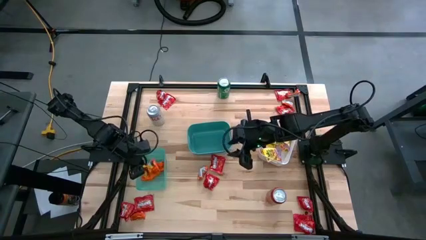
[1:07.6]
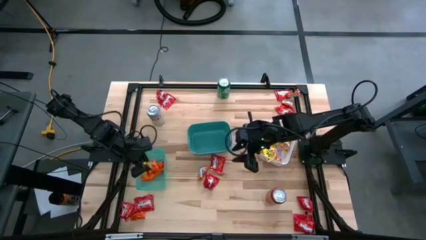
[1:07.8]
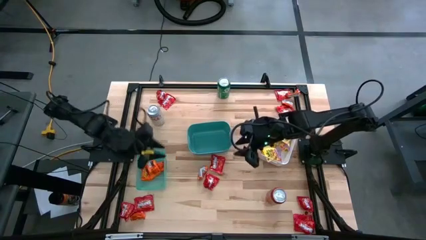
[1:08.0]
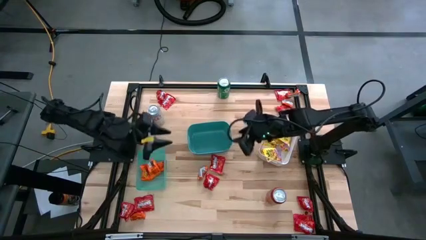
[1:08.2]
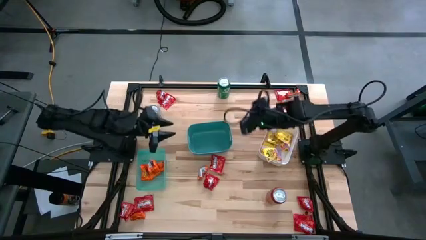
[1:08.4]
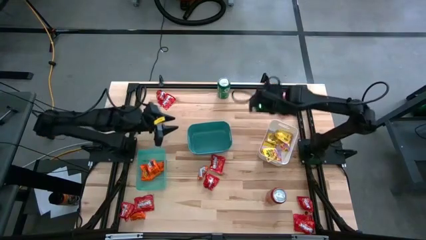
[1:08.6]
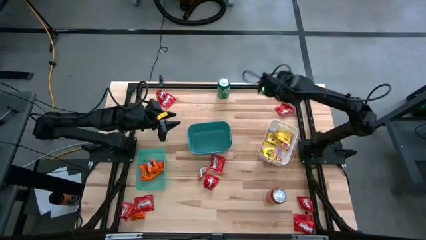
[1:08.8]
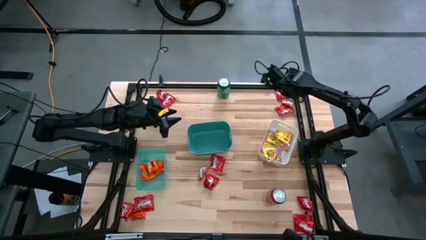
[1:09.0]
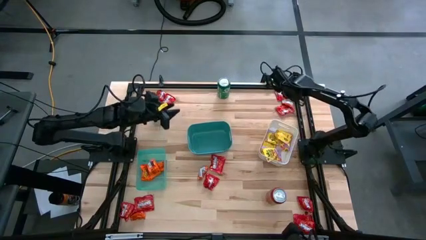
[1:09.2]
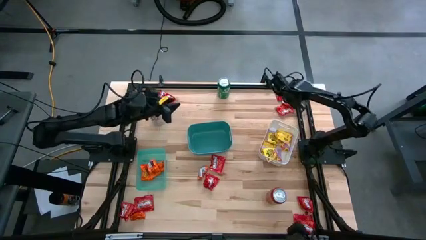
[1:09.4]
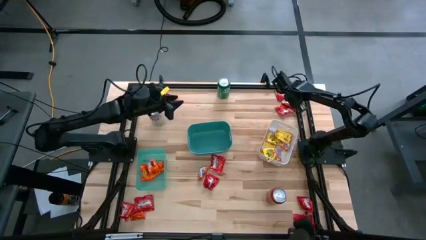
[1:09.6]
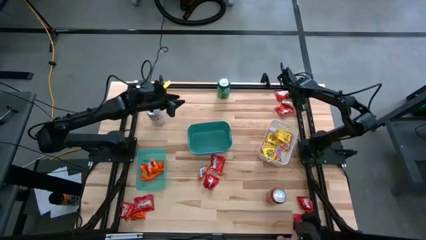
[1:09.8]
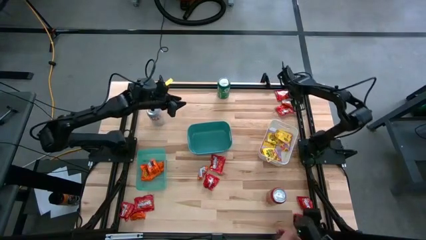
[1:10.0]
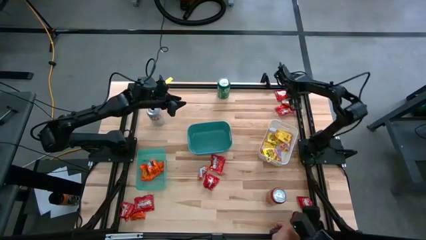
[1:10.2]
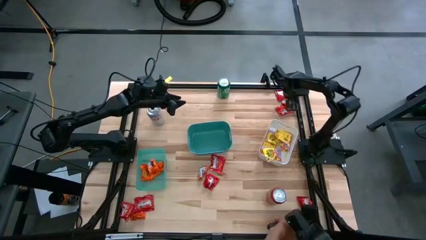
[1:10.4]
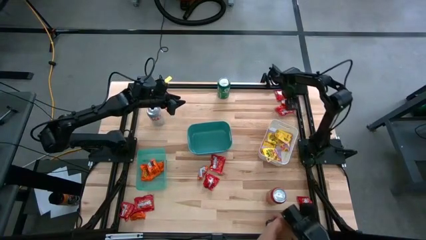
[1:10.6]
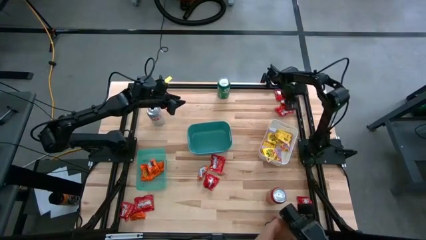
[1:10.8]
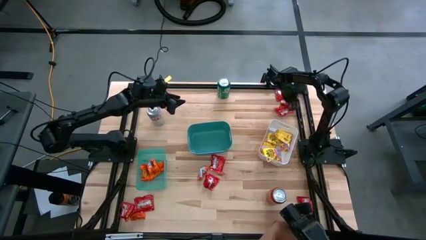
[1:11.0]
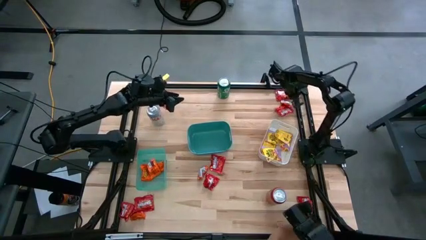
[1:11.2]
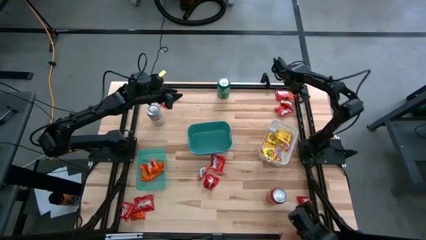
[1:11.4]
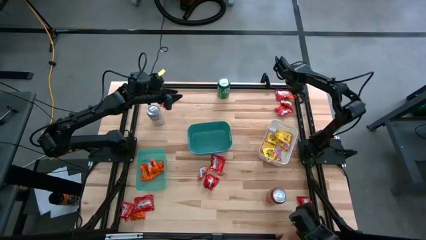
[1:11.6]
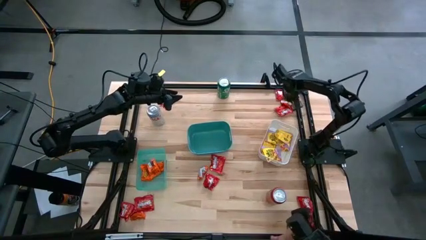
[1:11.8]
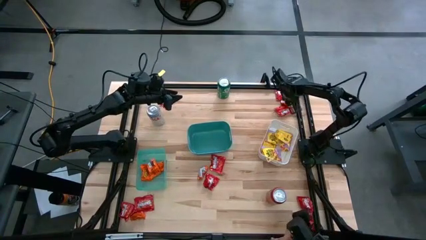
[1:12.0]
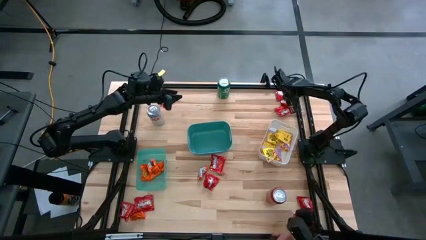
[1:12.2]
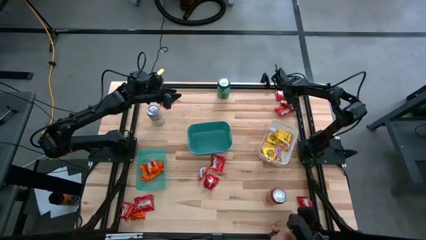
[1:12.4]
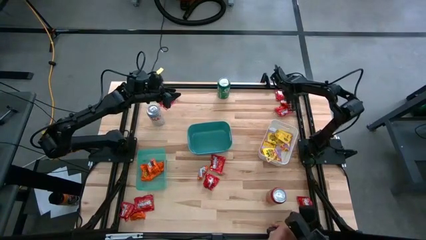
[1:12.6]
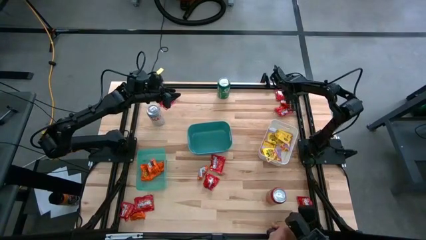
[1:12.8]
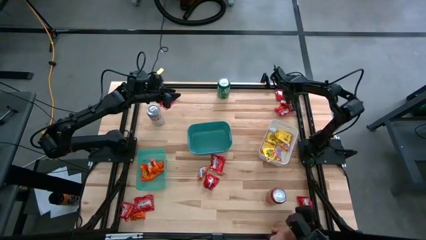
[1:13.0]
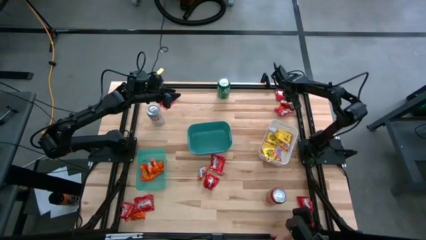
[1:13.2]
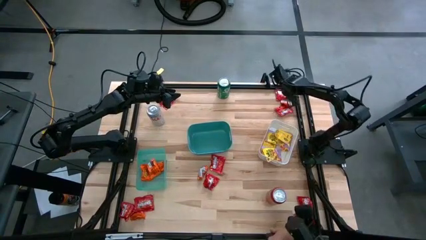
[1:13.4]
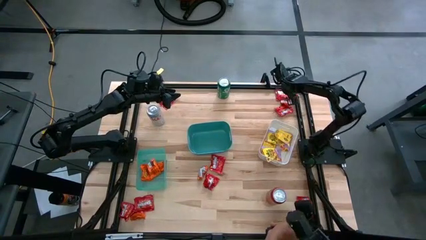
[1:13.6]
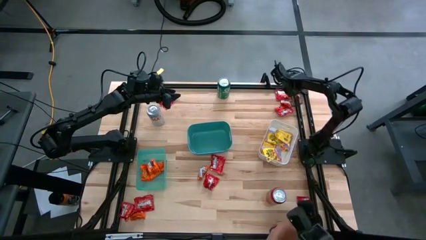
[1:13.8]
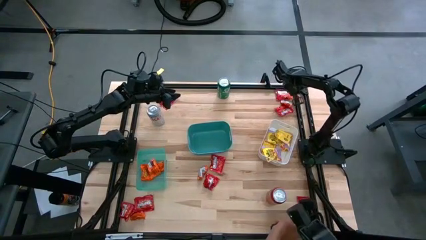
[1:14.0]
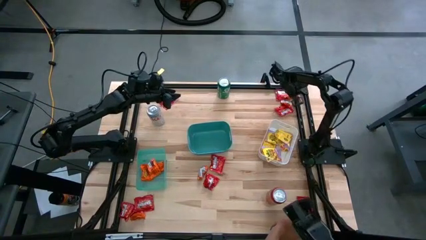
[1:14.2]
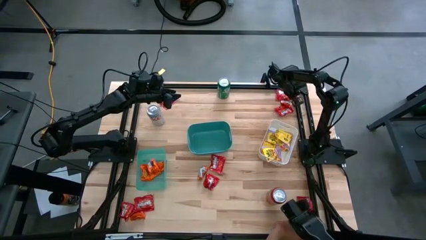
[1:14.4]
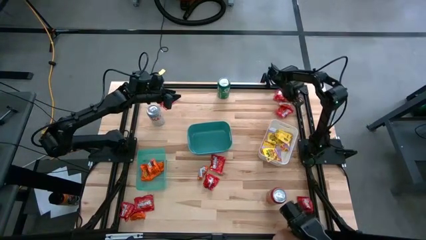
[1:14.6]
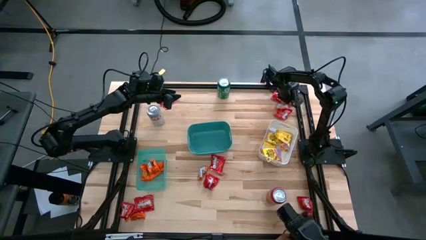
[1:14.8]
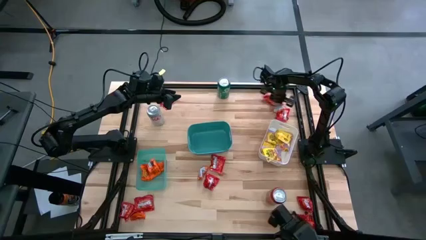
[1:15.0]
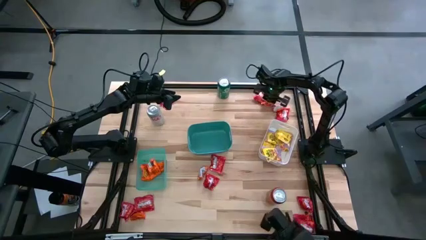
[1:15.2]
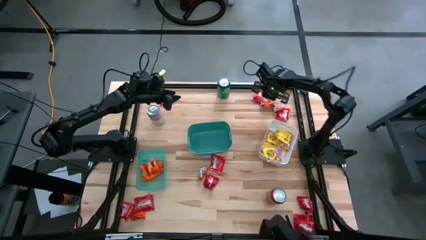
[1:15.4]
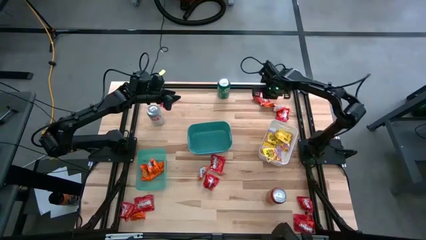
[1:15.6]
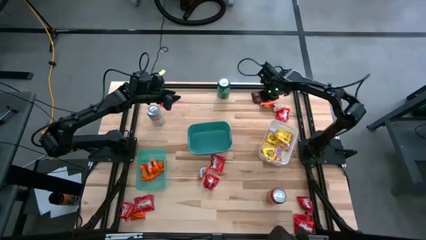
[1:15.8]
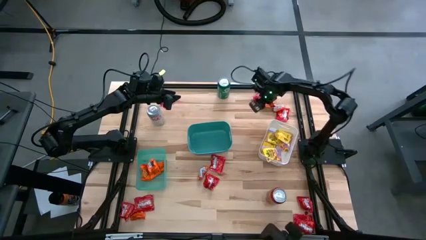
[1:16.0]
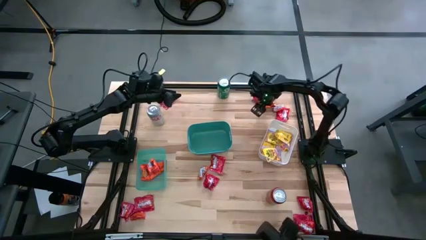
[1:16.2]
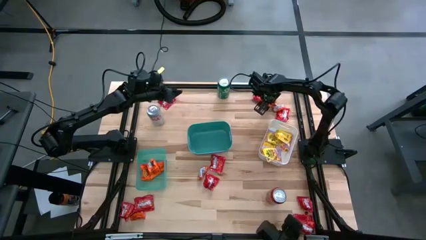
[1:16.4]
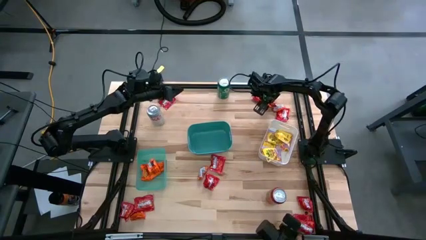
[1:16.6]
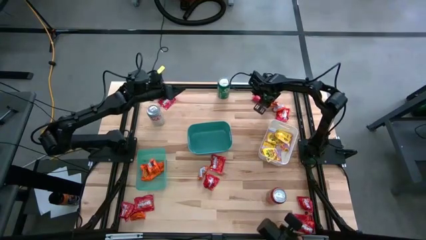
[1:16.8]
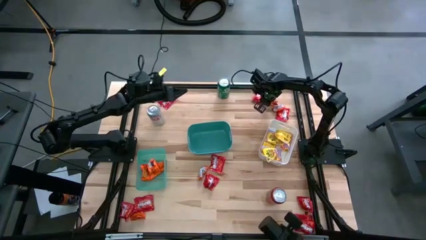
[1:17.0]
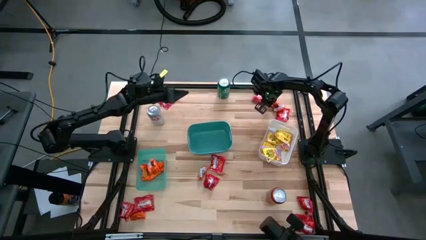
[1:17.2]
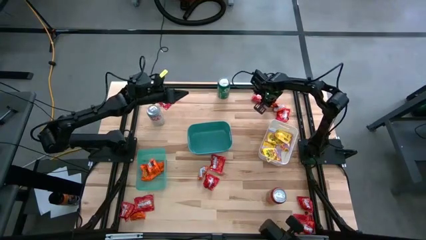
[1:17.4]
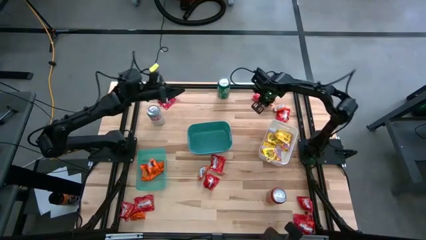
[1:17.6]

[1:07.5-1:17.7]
Task: Sort candy
Put the orange chocolate into the light green bin

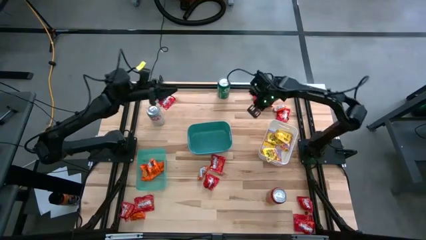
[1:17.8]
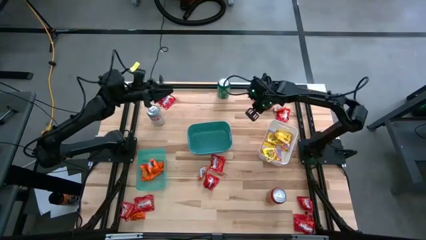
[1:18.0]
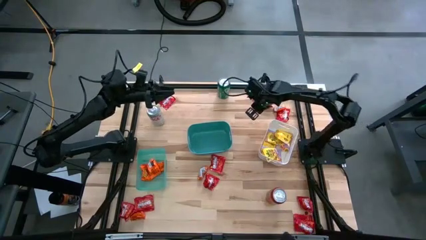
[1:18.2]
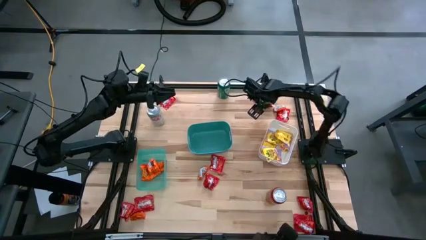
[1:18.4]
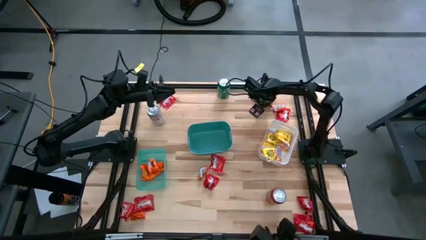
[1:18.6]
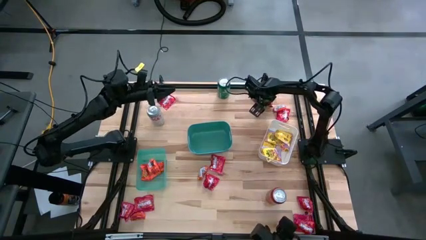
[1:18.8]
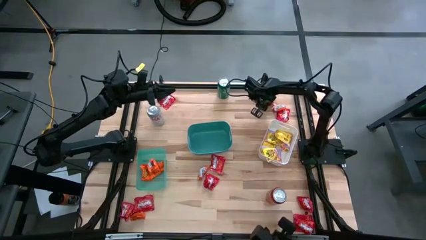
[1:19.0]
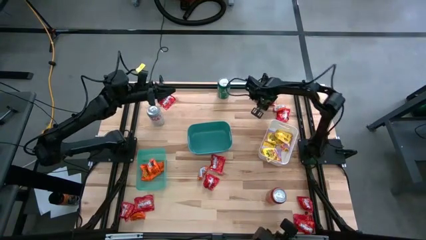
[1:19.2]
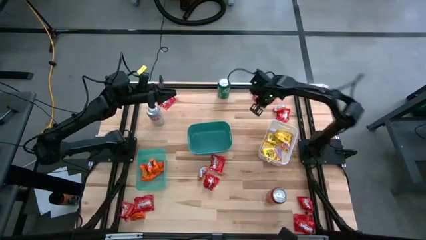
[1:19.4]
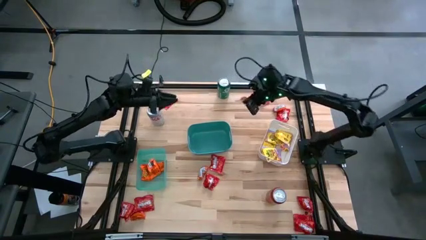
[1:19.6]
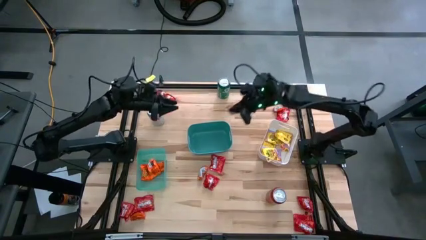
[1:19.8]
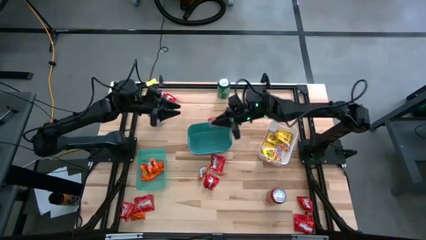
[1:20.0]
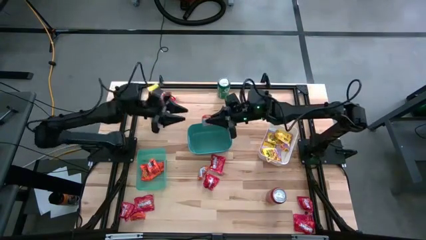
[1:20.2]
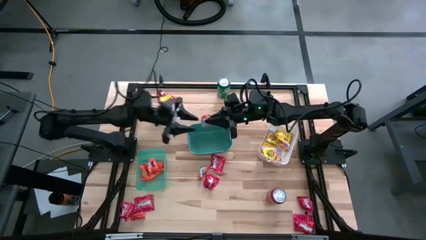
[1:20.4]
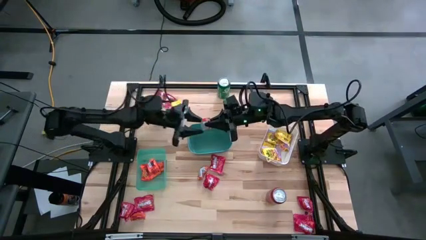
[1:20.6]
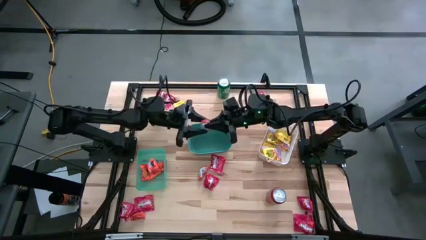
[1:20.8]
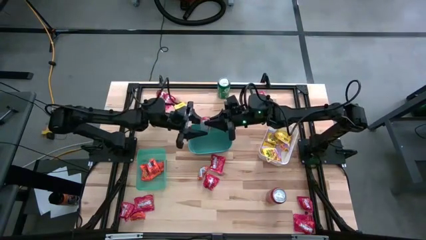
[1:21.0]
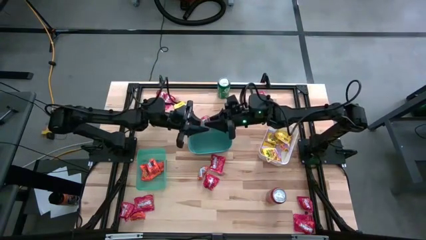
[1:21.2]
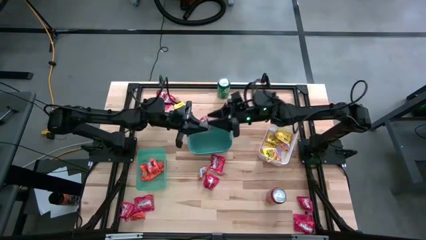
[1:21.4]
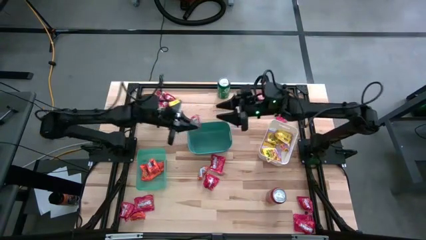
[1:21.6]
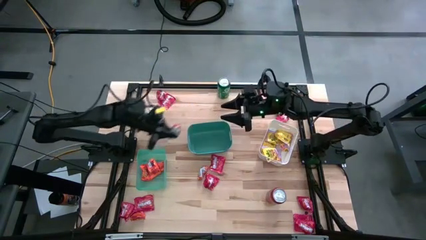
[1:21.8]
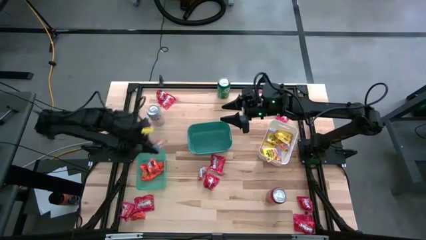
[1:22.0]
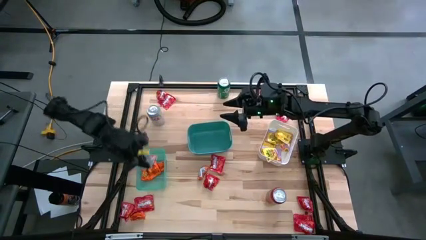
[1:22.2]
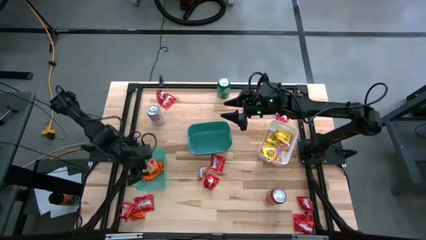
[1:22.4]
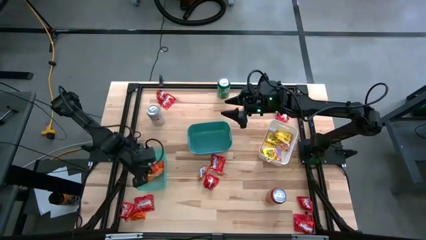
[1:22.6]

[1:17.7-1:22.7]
Put the orange chocolate into the light green bin

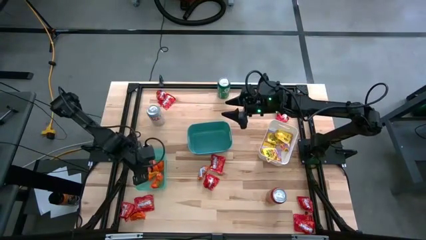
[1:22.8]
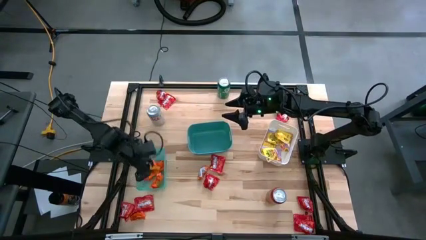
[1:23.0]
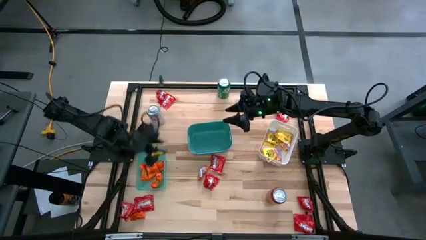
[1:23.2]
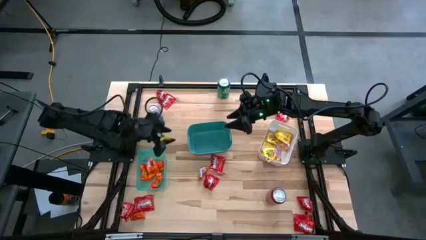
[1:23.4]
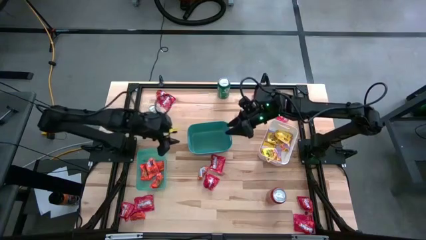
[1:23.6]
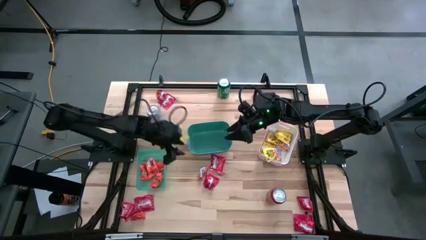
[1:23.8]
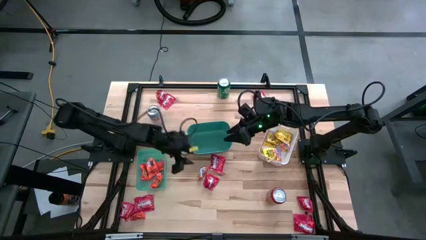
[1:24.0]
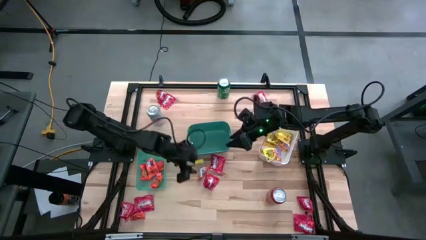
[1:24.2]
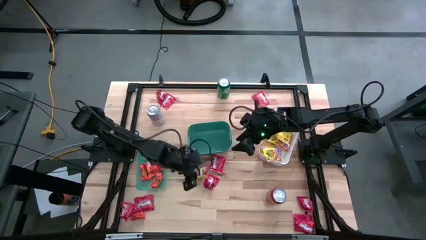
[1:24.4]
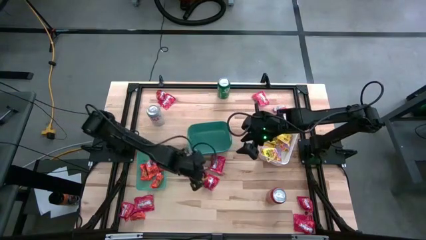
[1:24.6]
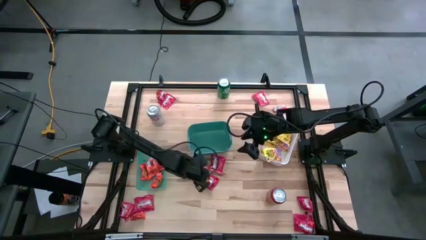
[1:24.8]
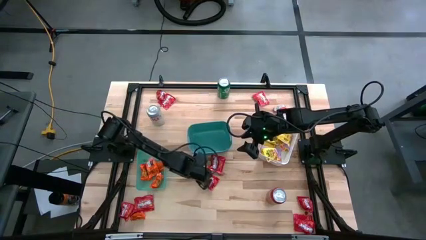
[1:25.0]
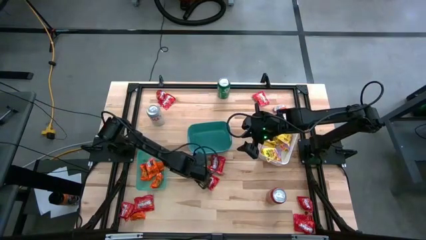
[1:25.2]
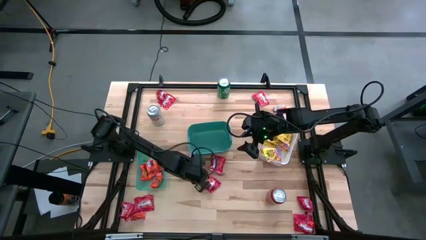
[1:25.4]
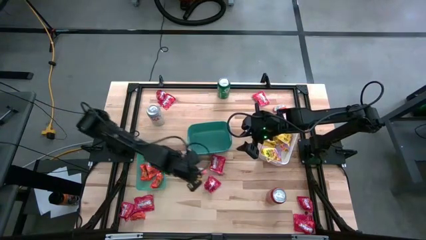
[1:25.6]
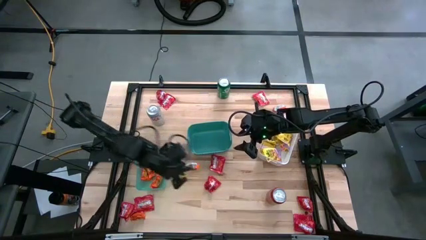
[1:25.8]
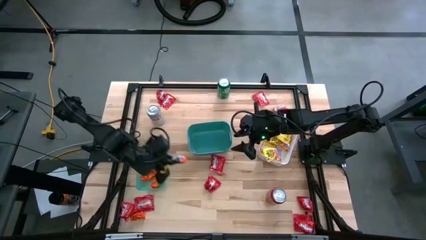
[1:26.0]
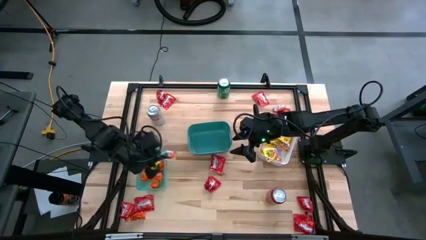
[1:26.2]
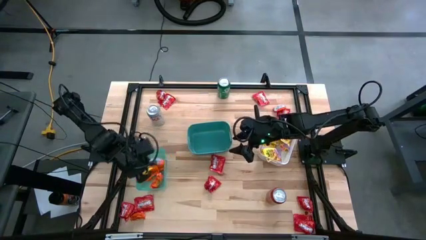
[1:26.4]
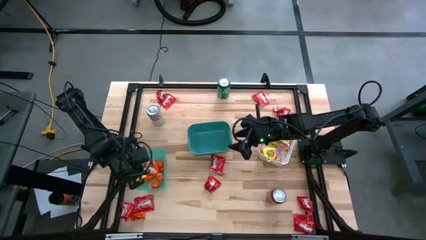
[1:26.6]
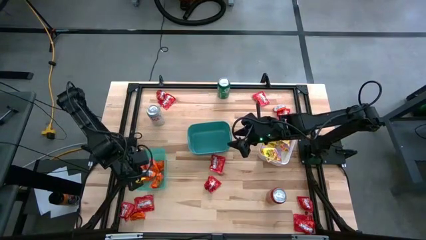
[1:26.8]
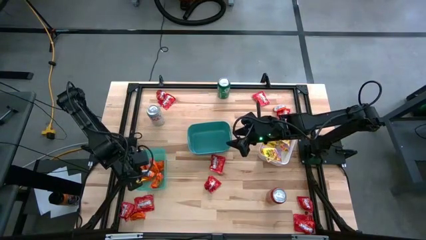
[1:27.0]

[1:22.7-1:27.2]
Put the orange chocolate into the light green bin
